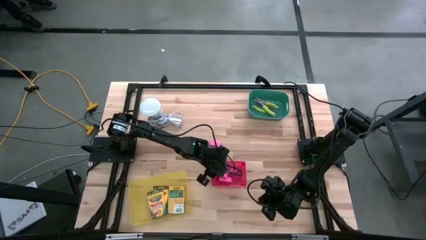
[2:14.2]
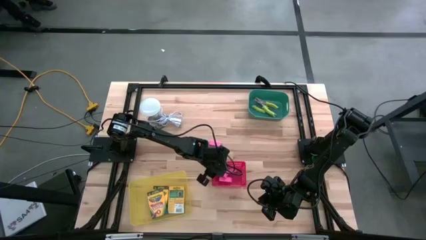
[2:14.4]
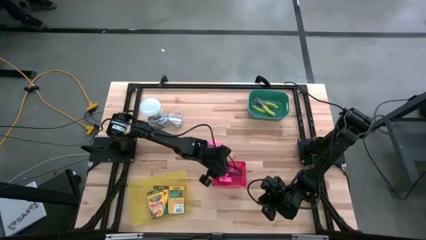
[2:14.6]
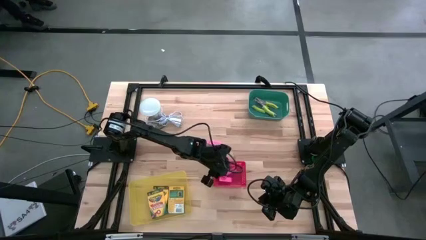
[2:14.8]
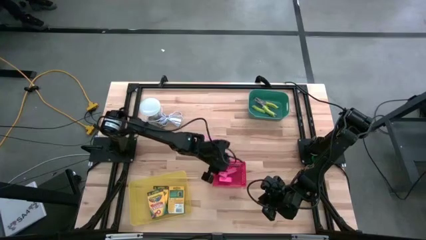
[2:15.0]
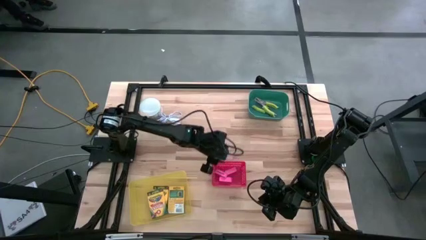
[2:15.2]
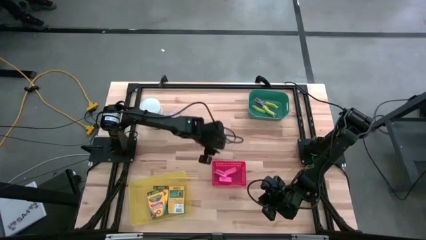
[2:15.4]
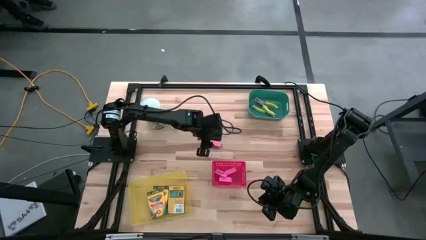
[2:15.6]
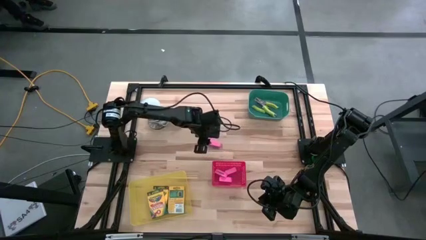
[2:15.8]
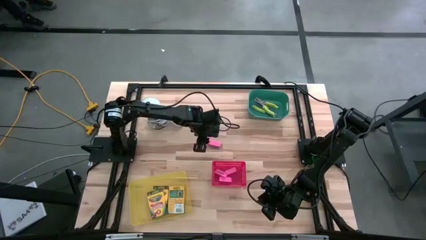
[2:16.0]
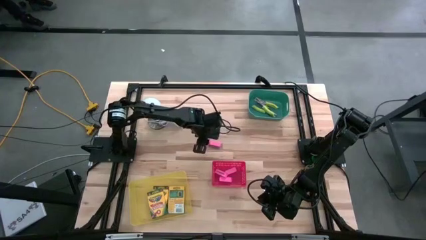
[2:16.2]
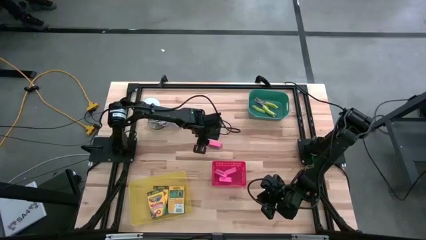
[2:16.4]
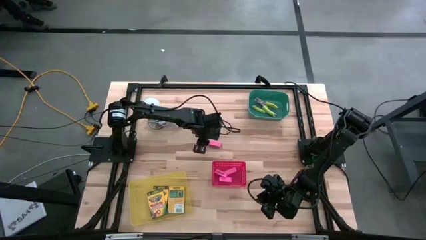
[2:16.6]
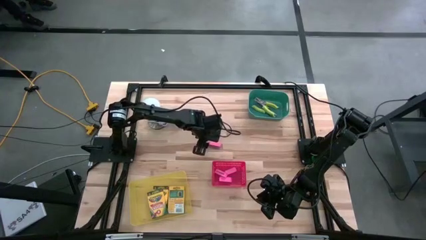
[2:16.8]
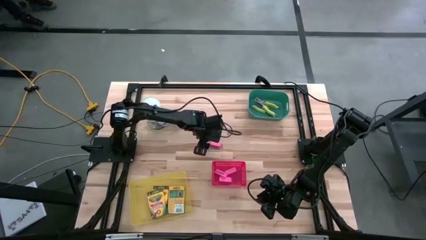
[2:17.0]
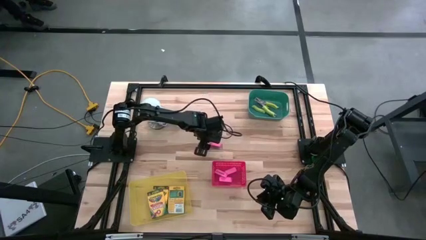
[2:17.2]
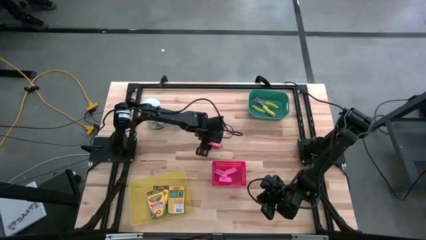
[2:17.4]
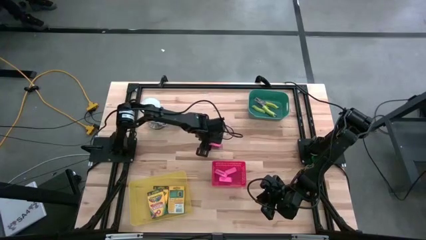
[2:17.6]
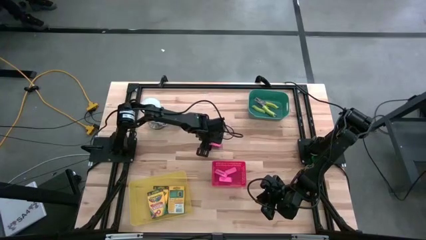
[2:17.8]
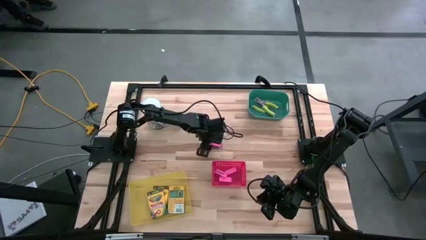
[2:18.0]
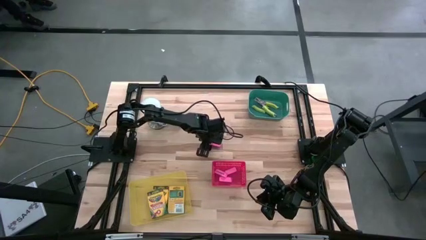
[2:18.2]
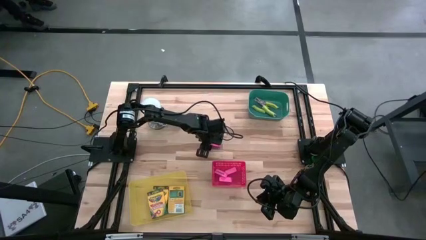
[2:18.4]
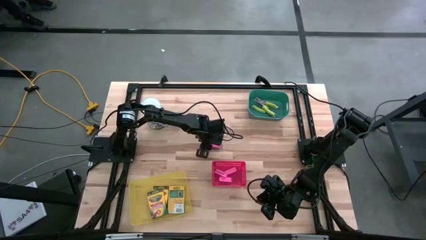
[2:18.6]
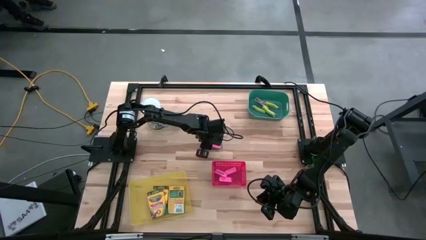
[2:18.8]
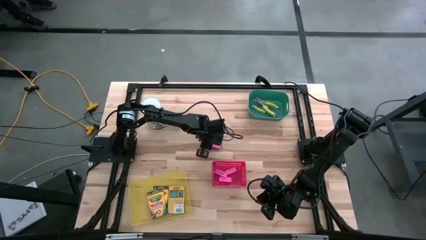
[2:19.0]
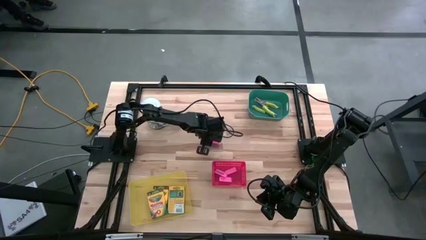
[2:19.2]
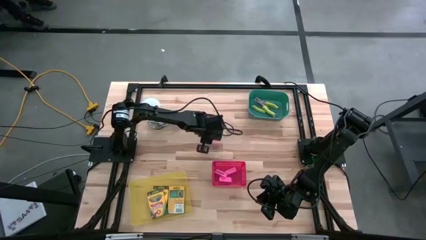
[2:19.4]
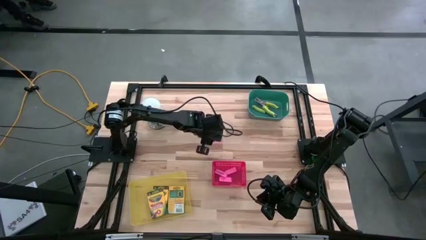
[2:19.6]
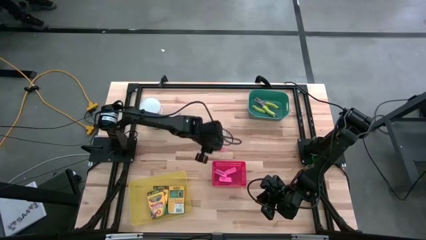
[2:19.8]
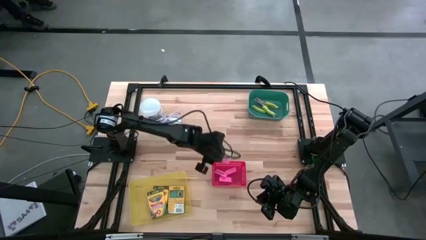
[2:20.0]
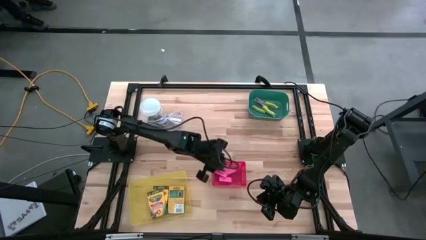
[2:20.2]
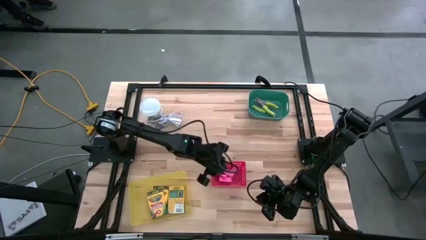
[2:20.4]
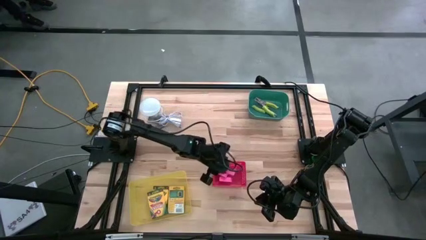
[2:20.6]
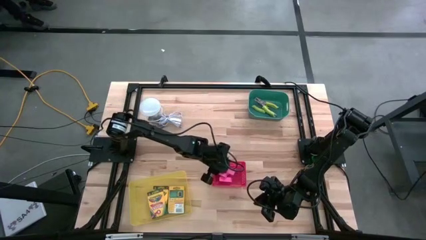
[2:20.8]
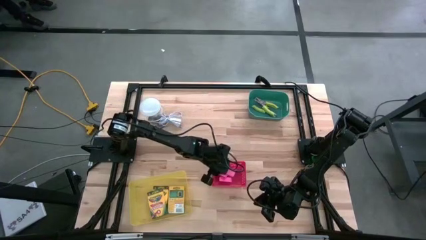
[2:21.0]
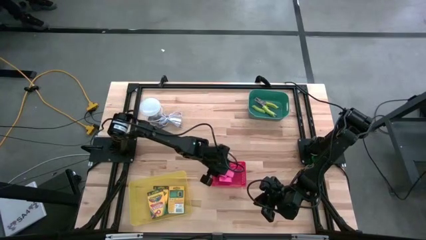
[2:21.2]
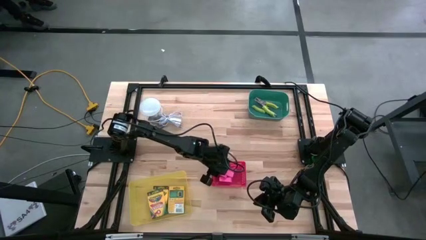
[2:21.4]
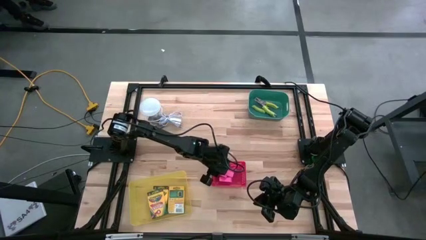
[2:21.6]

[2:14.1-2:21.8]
Task: Pick & Place School Supplies
Put the pink eraser into the red bin

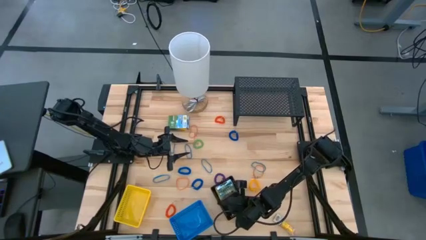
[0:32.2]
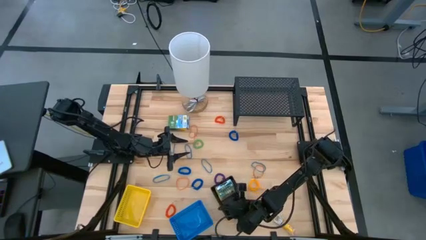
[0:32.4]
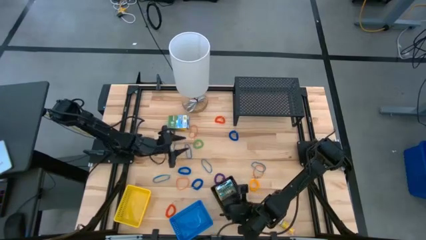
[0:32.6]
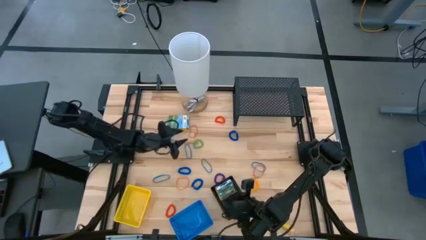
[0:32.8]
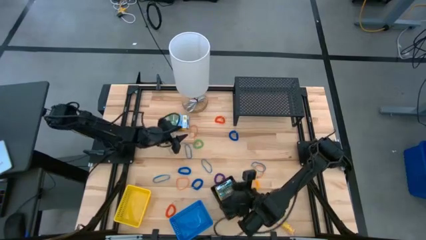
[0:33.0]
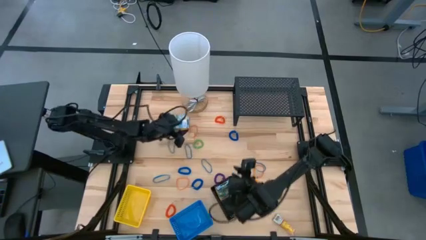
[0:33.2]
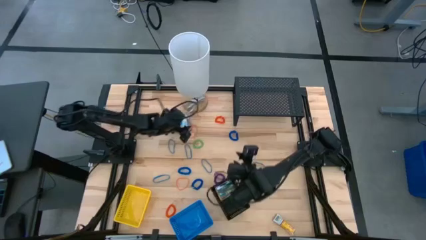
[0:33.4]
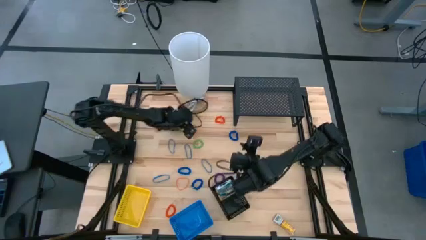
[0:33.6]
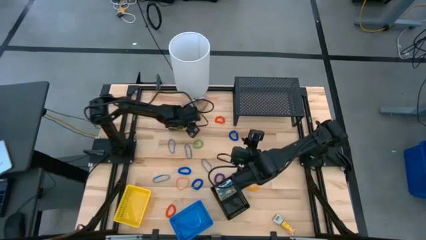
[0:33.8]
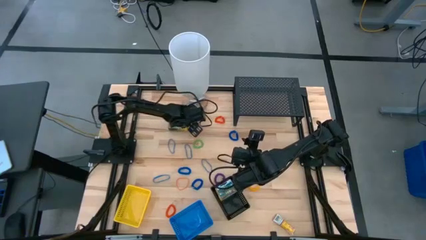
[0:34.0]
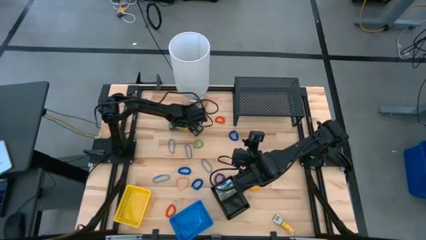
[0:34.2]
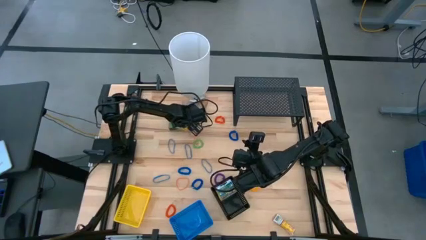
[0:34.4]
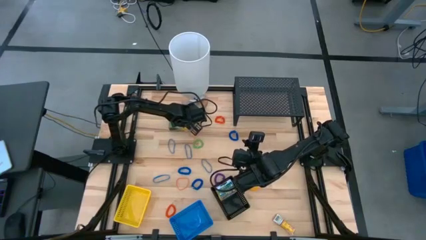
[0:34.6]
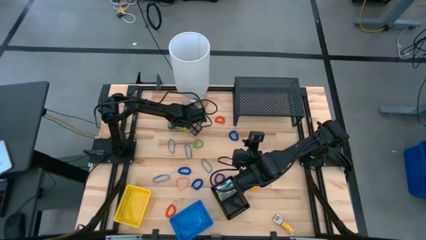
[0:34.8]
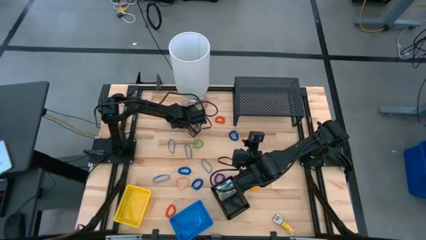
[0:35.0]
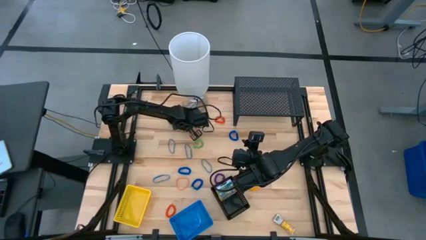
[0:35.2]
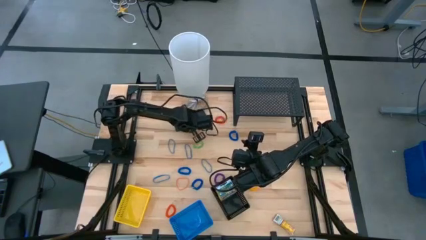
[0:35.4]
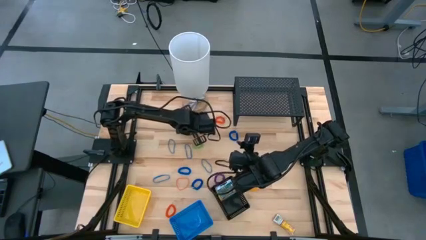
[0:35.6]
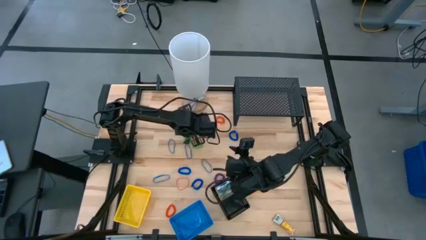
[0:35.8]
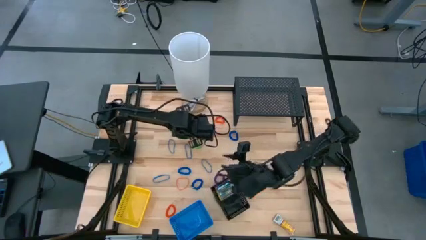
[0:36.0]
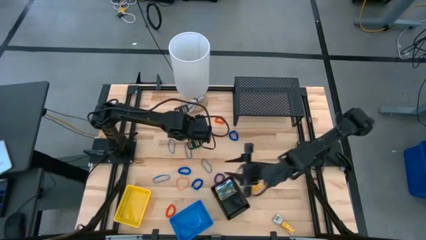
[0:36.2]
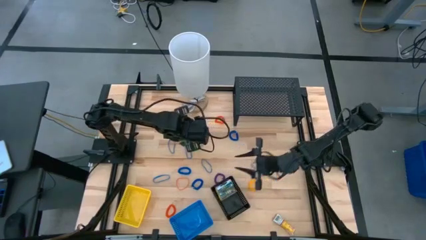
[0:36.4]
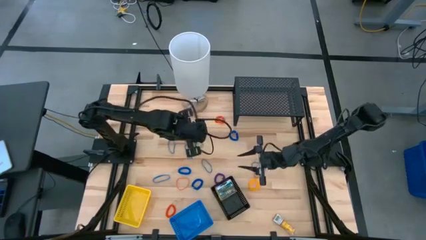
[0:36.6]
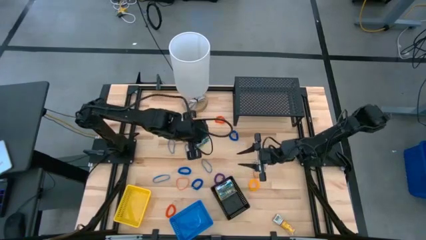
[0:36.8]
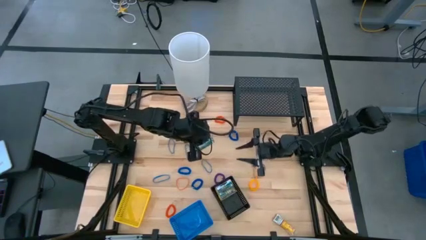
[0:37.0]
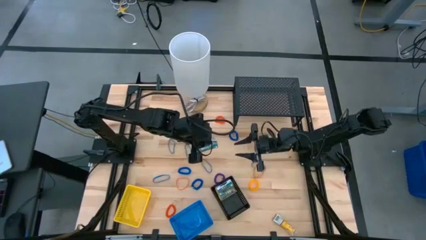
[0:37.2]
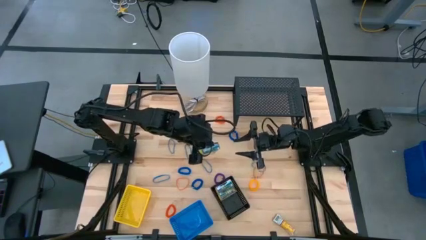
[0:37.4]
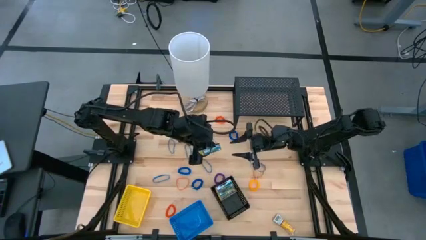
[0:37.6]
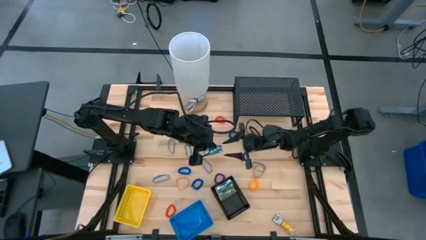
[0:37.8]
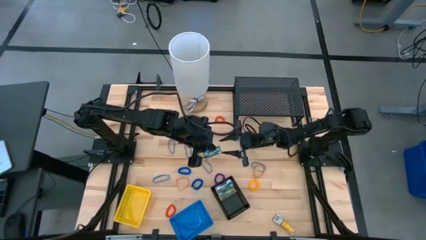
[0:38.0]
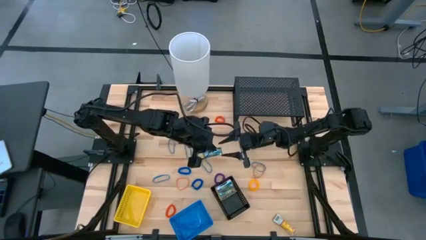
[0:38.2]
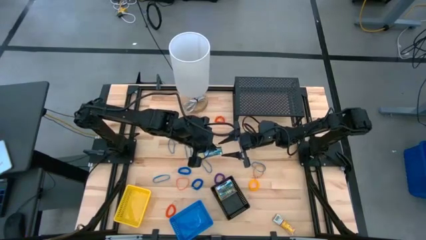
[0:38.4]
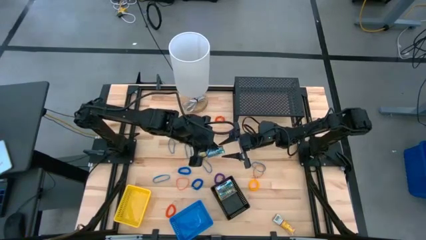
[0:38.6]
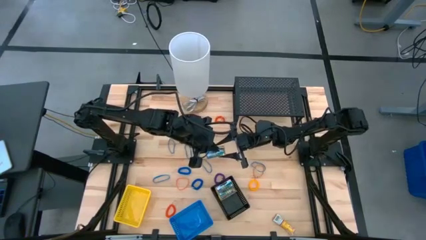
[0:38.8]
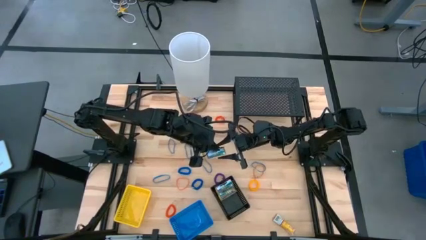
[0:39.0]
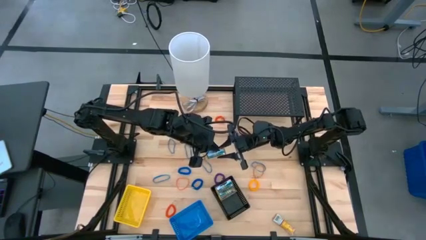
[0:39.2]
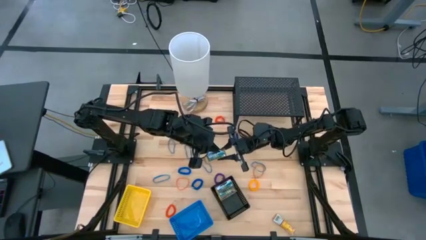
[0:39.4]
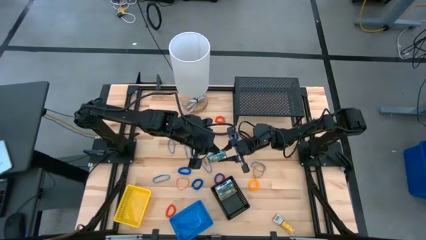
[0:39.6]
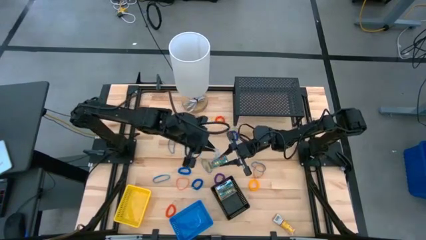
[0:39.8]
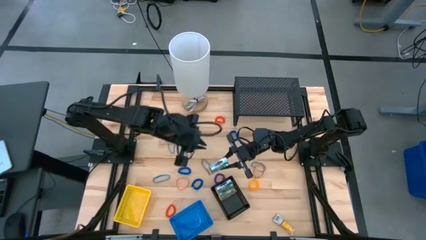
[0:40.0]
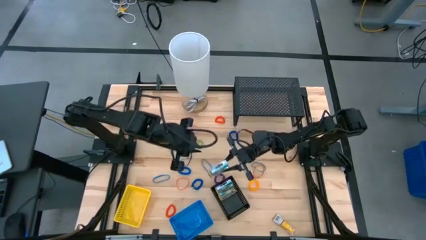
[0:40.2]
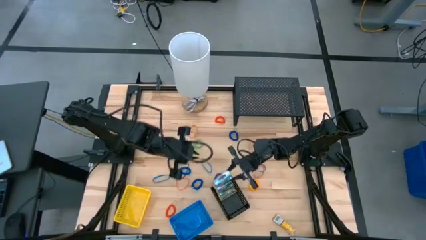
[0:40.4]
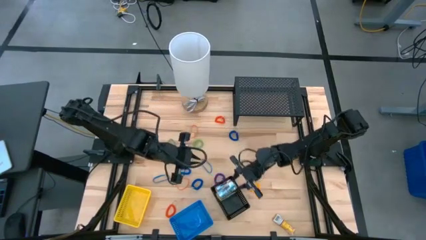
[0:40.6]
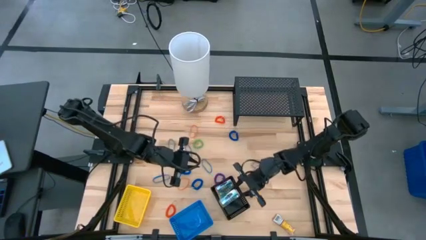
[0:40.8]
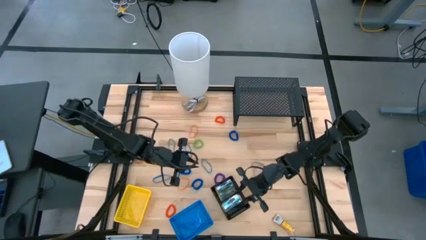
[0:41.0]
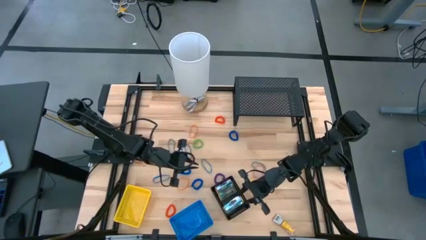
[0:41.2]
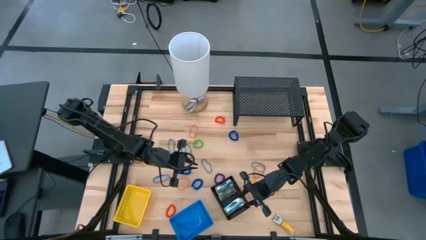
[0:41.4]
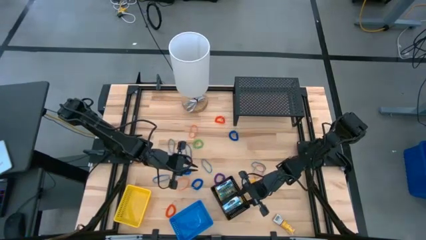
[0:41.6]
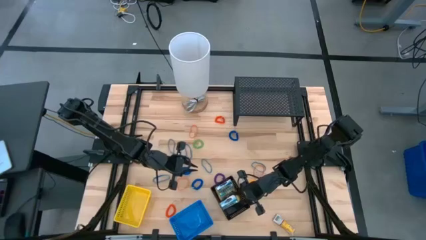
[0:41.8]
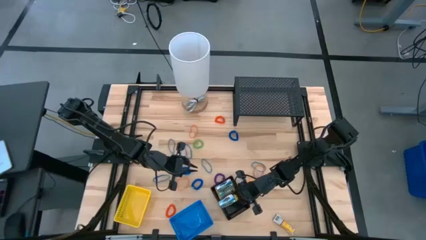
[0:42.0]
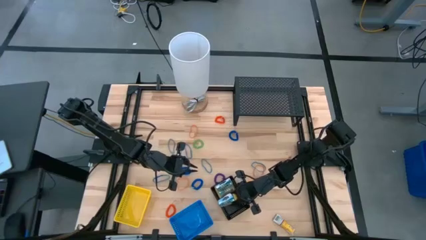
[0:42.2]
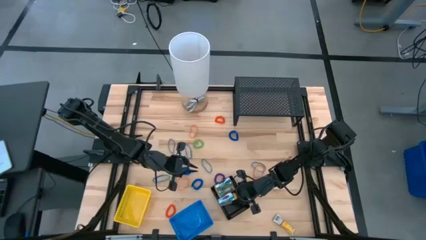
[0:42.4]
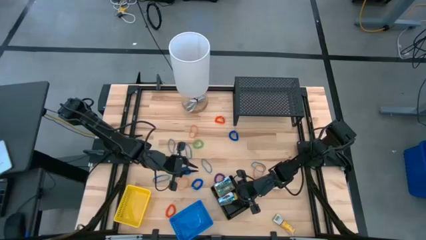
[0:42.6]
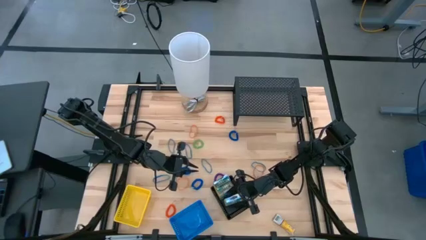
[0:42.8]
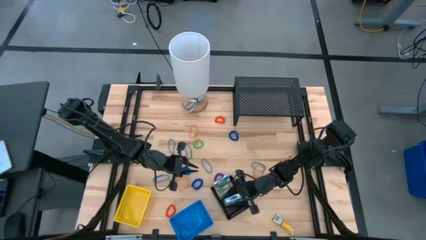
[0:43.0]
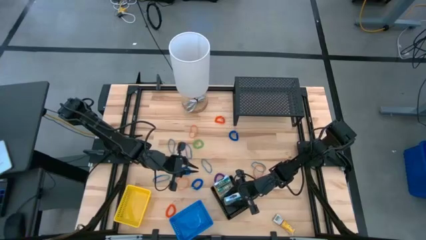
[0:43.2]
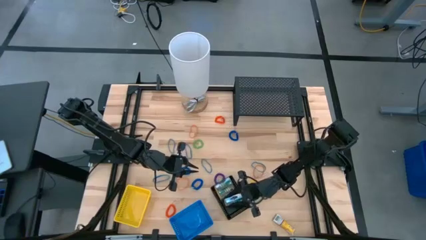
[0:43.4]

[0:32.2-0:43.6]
Task: Pick & Place Office Desk Supplies
Put the yellow crayon box into the black bin
